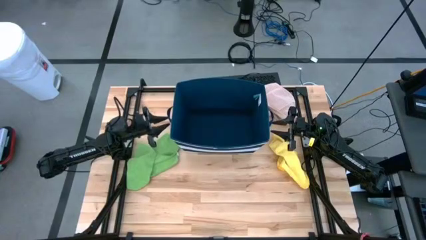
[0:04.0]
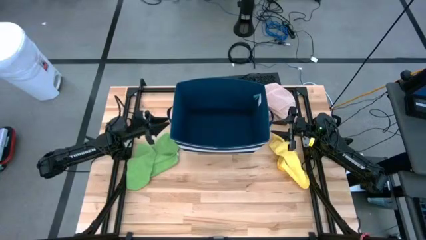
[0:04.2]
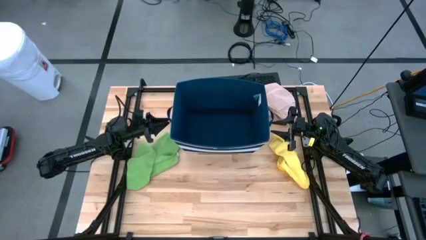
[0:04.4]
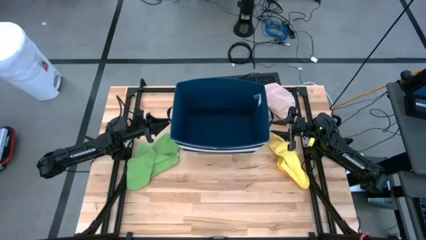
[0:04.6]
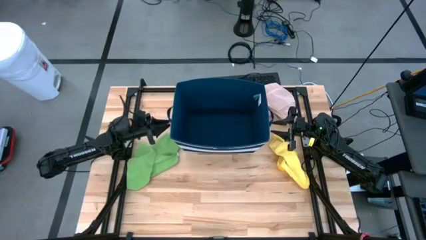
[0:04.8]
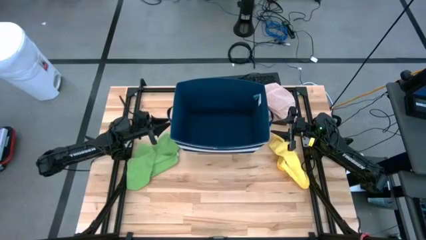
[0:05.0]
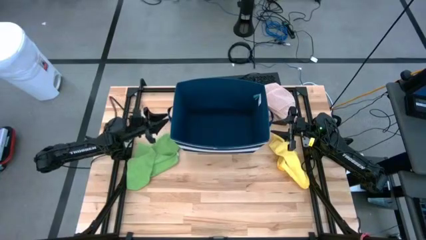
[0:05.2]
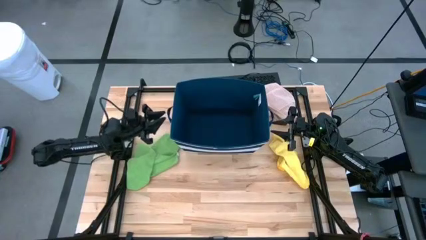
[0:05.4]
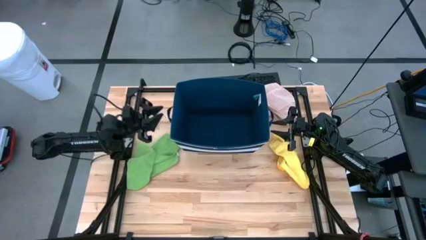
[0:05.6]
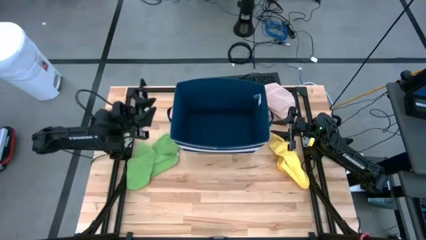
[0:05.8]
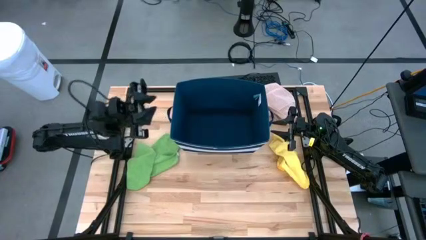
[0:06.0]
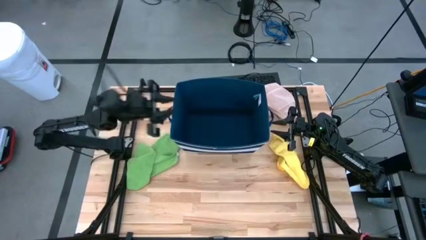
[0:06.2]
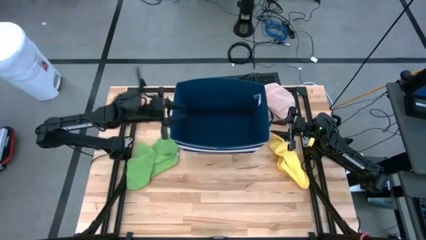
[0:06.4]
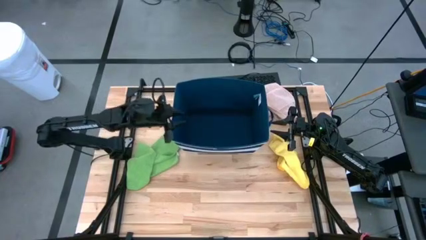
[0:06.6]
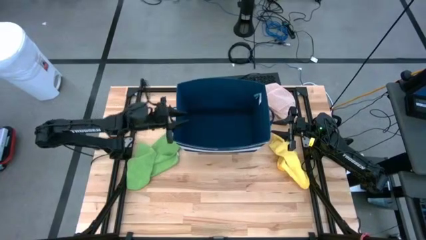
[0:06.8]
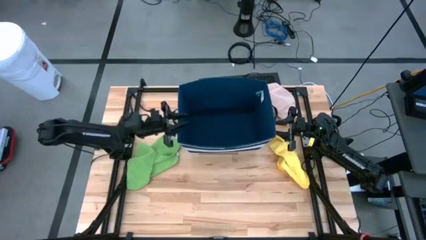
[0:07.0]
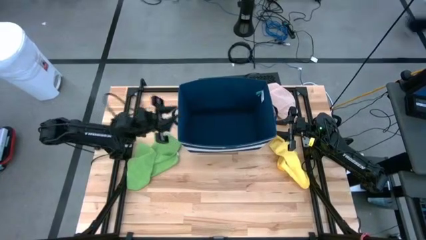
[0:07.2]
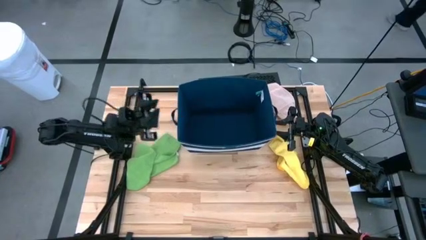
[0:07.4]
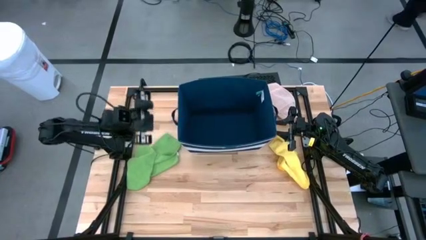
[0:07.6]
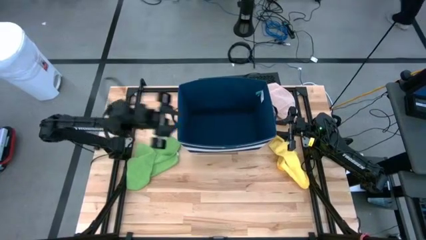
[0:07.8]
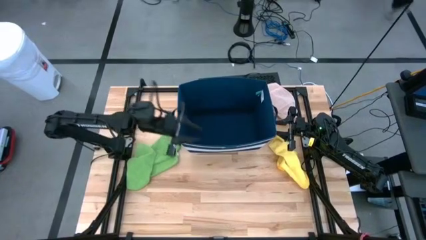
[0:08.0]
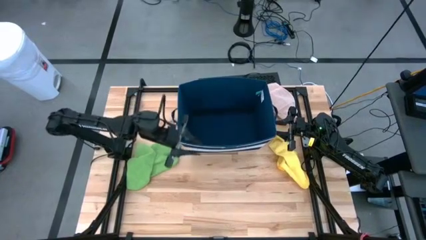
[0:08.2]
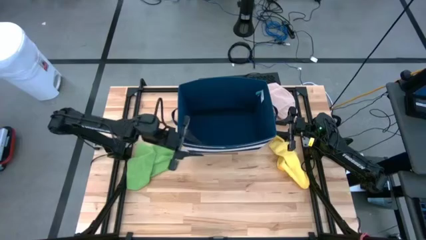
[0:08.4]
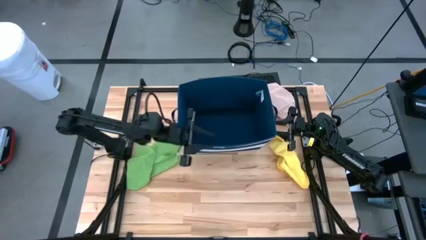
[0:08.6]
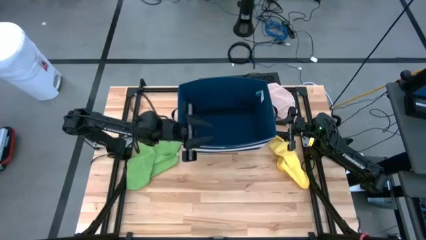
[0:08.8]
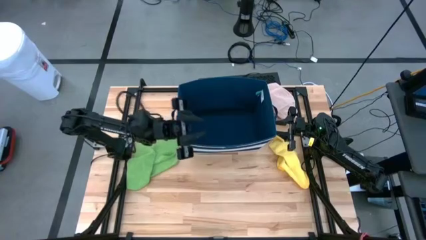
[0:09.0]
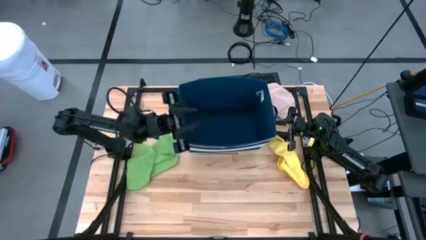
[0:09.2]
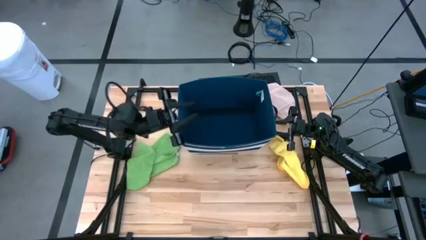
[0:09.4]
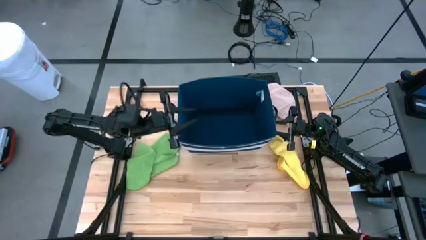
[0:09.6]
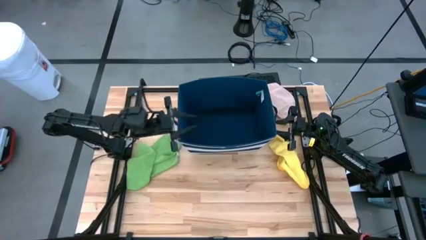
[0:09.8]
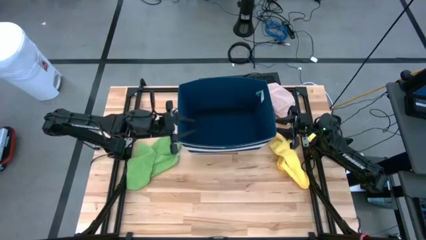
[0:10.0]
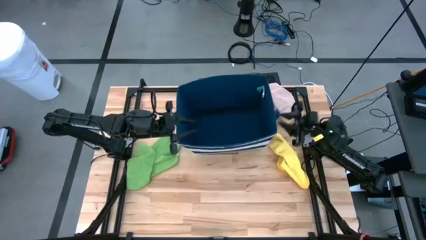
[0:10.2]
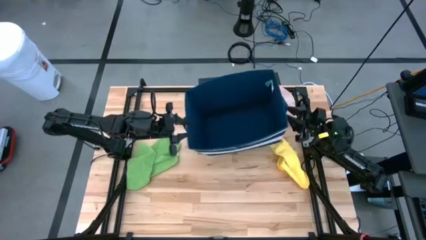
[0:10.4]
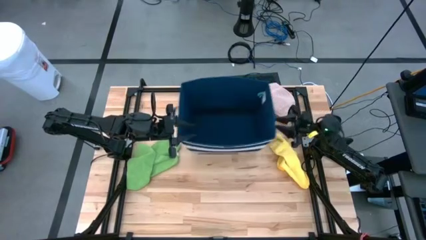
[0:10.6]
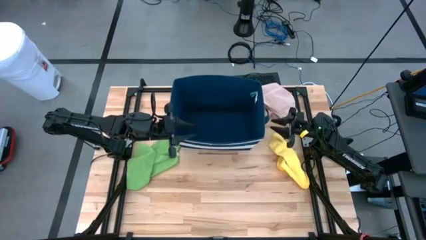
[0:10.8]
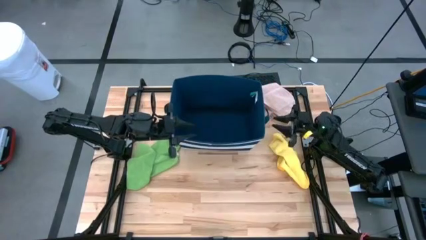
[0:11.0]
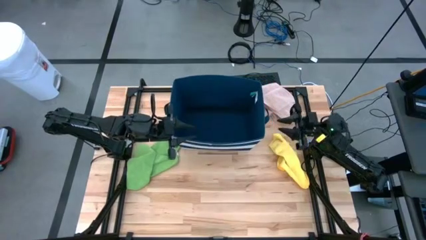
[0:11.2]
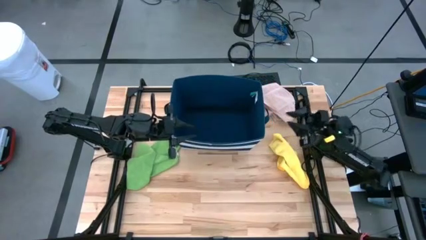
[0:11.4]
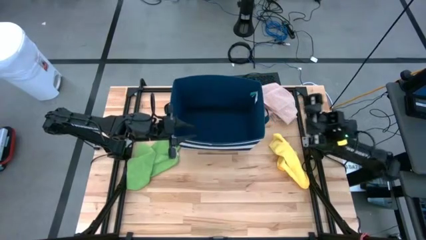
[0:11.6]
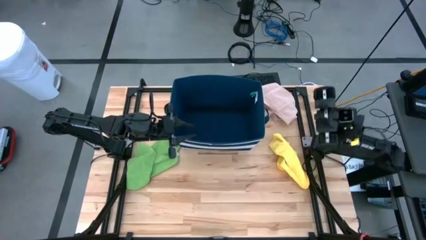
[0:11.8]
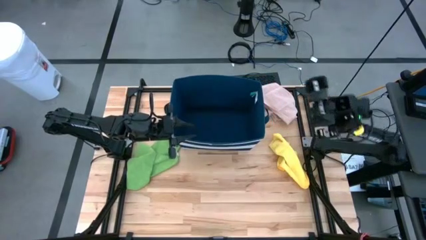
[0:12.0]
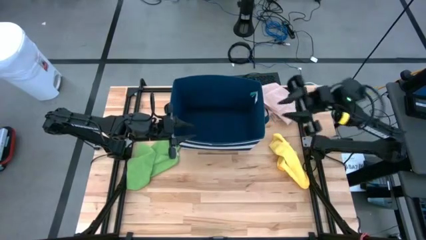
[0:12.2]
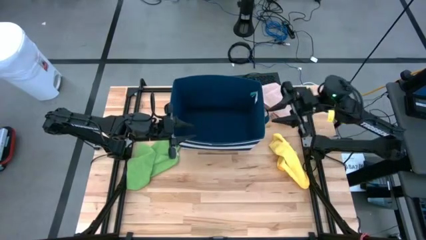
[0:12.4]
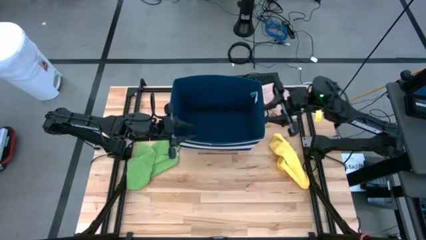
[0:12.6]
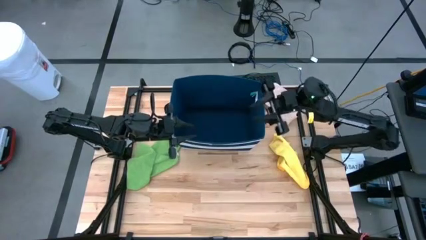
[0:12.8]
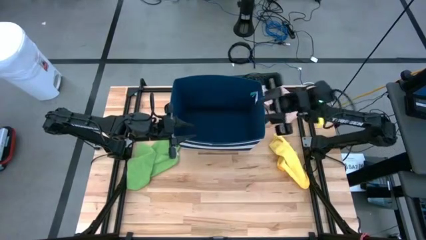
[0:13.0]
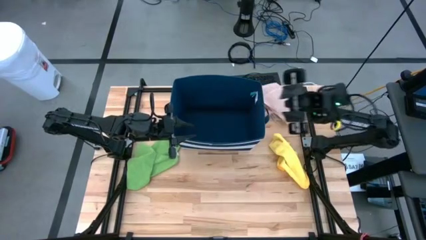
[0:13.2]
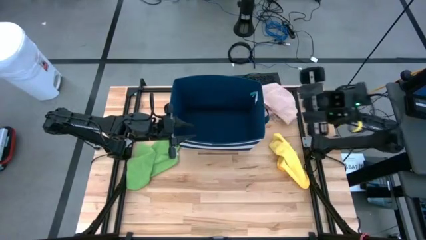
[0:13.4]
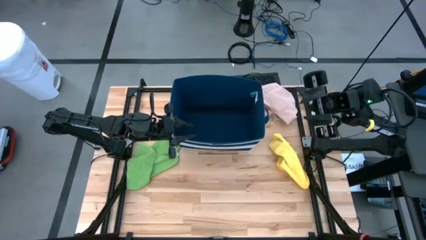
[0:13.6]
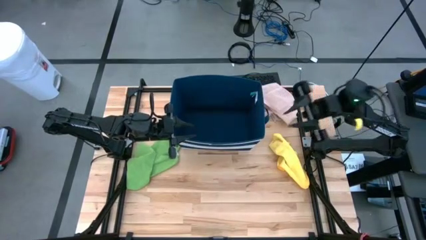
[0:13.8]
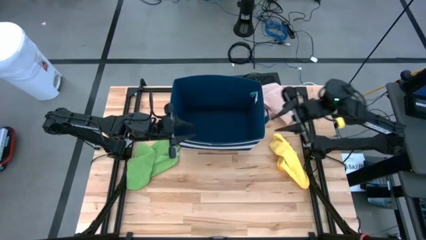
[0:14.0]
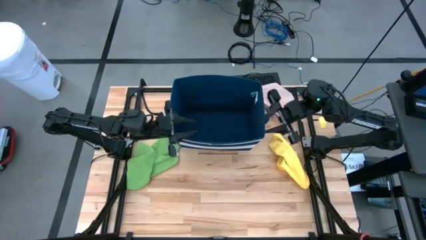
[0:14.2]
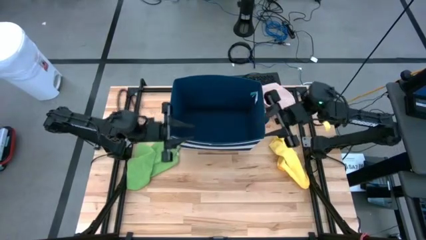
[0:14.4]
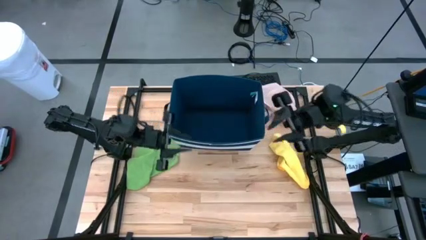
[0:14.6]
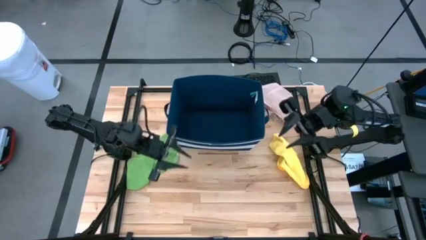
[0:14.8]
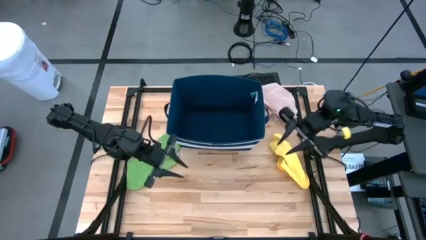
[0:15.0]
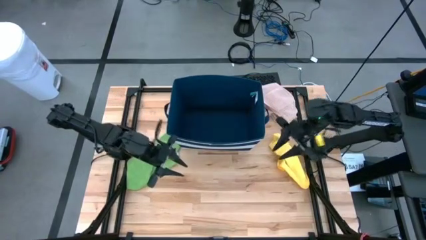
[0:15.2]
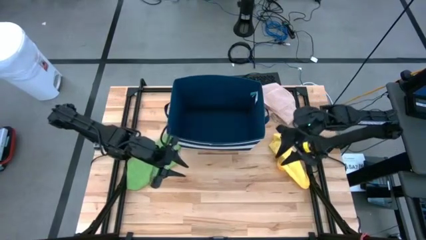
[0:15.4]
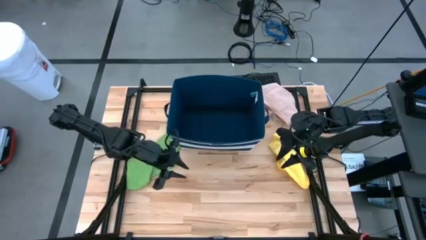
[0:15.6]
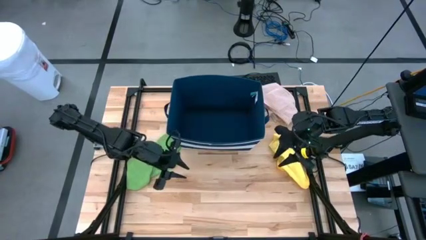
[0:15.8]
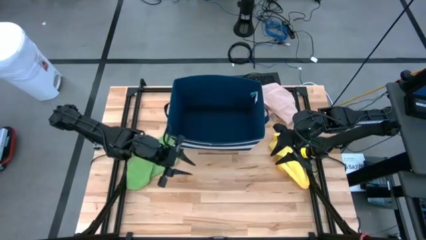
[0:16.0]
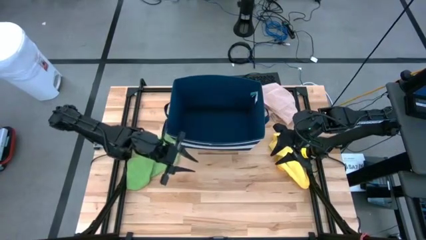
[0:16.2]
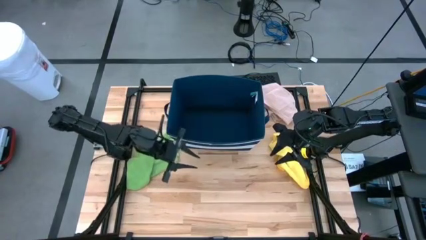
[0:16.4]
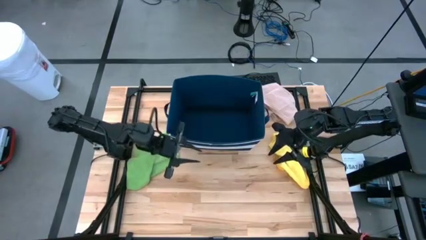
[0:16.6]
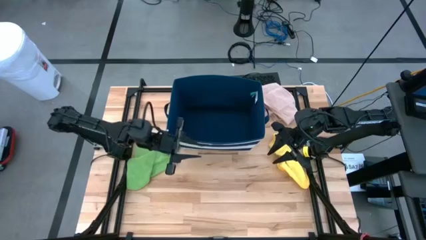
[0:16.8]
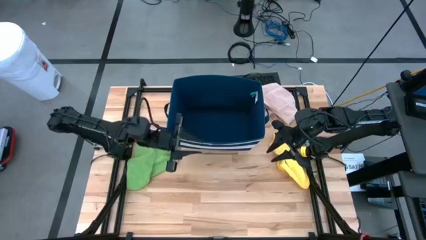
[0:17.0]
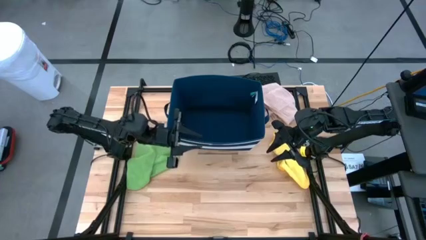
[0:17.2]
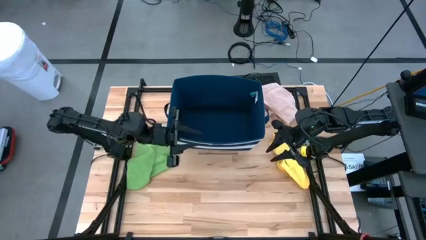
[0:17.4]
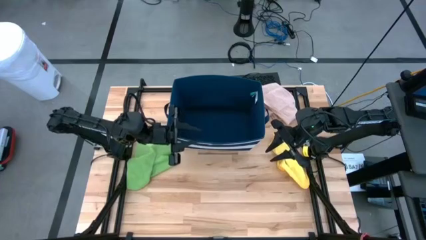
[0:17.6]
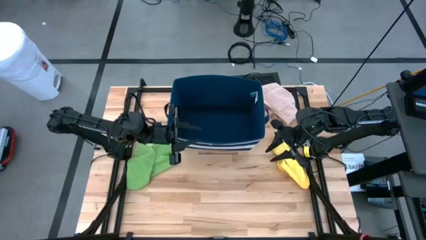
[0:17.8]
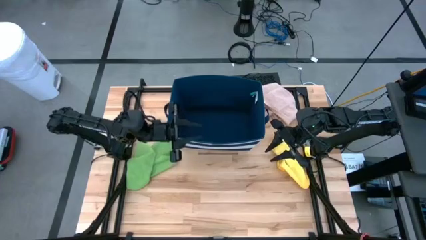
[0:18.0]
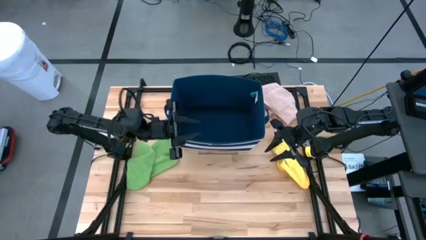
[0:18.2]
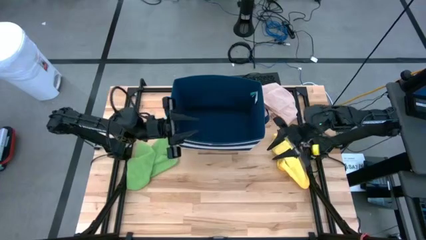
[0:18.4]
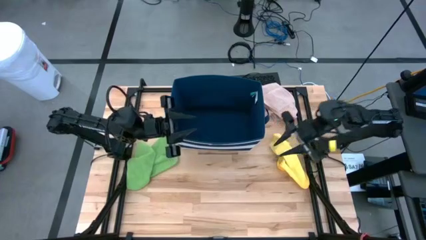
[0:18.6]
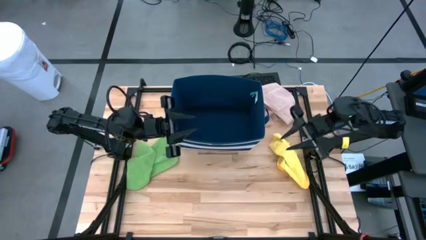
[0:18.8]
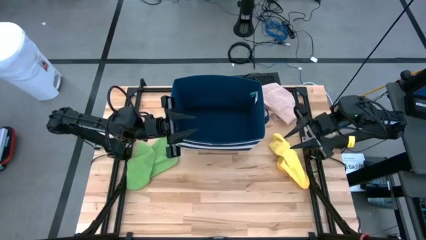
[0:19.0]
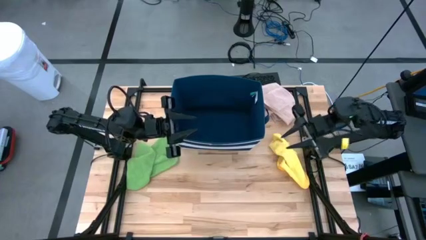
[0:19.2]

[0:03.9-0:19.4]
Task: Fold towel
Fold the yellow towel
